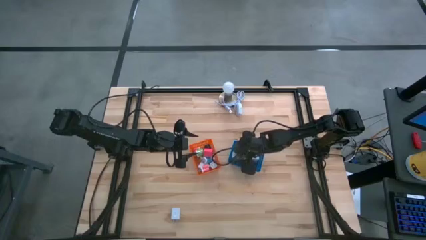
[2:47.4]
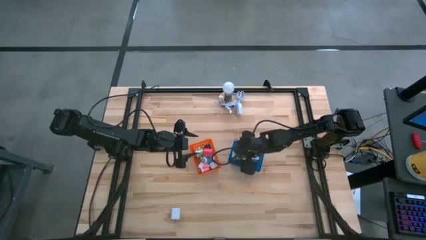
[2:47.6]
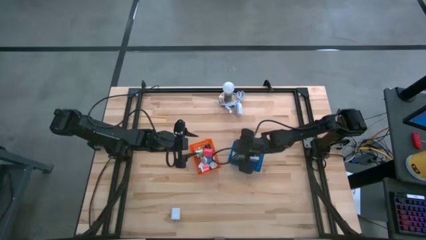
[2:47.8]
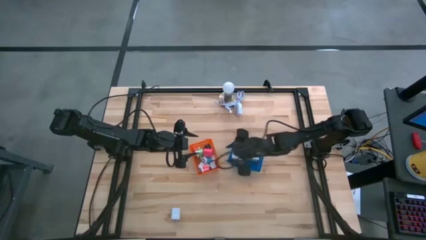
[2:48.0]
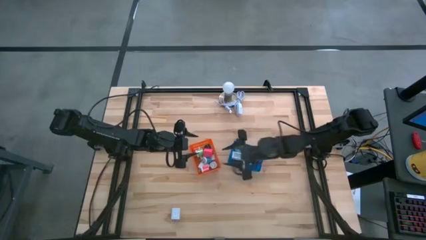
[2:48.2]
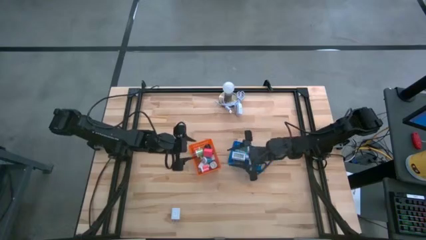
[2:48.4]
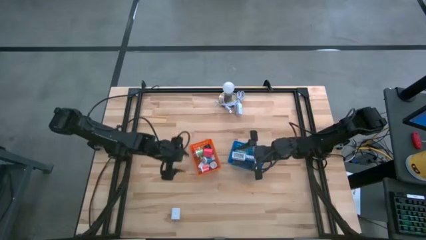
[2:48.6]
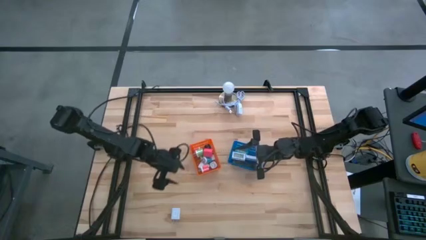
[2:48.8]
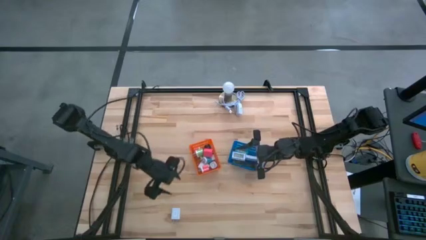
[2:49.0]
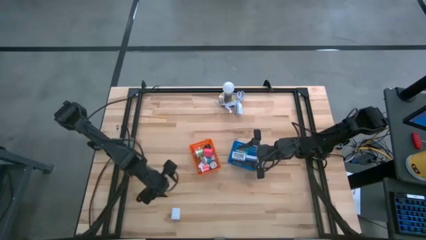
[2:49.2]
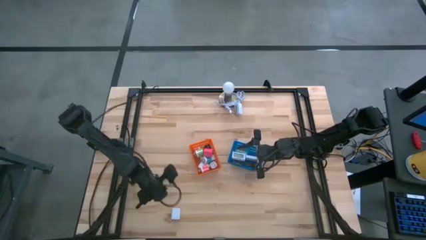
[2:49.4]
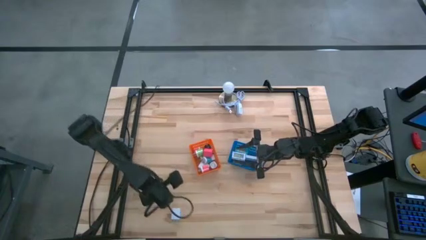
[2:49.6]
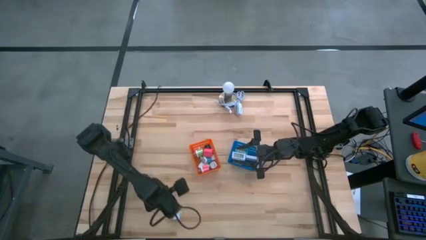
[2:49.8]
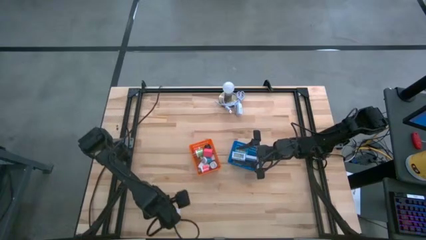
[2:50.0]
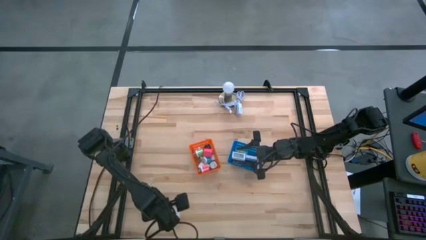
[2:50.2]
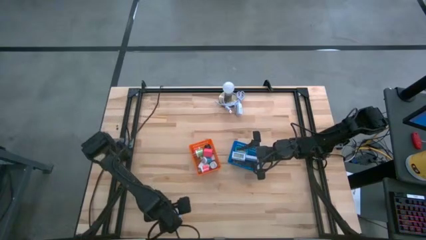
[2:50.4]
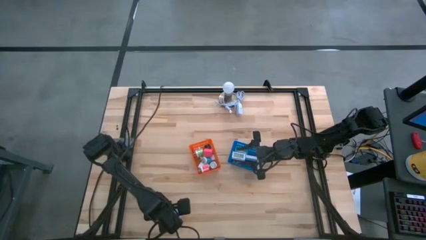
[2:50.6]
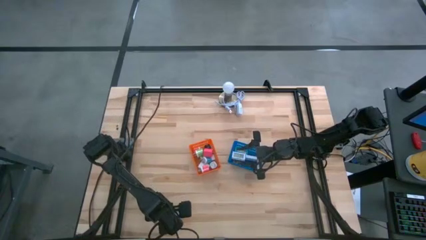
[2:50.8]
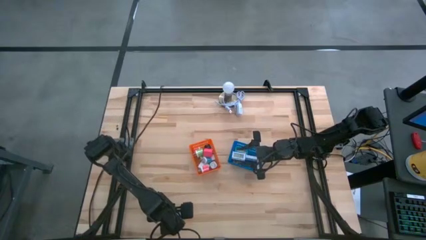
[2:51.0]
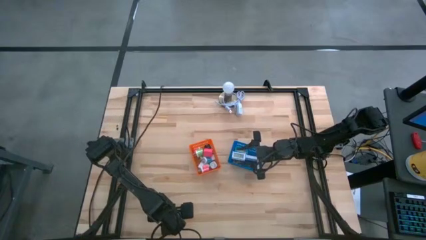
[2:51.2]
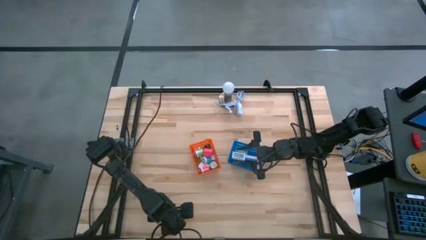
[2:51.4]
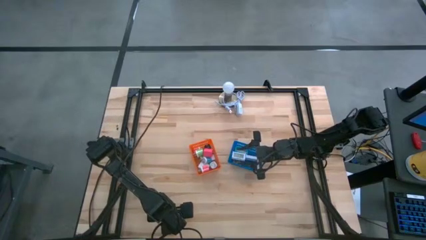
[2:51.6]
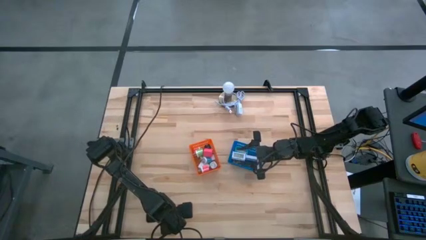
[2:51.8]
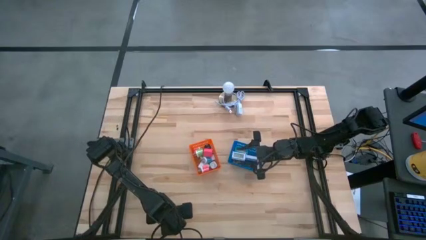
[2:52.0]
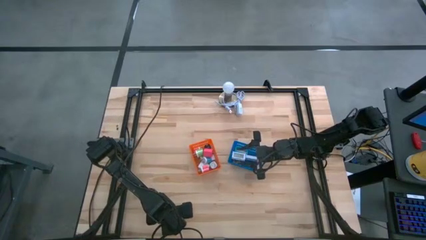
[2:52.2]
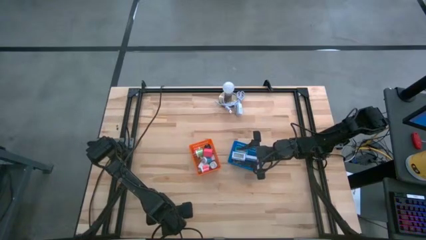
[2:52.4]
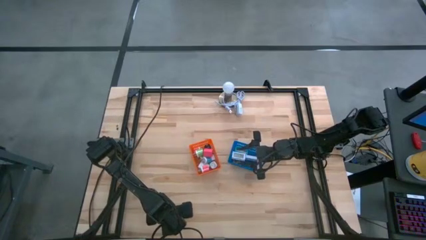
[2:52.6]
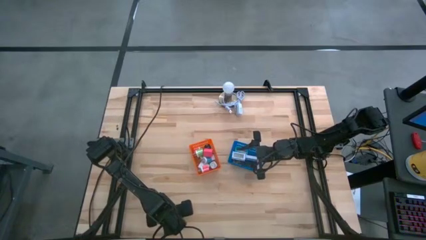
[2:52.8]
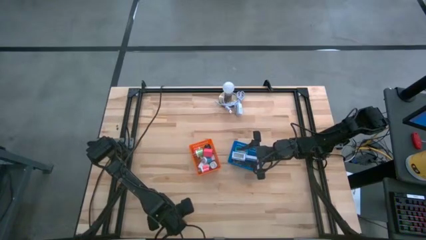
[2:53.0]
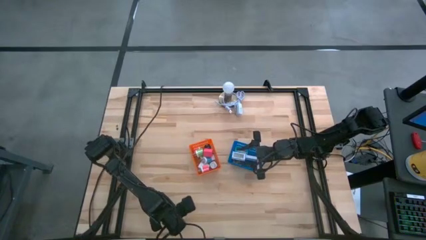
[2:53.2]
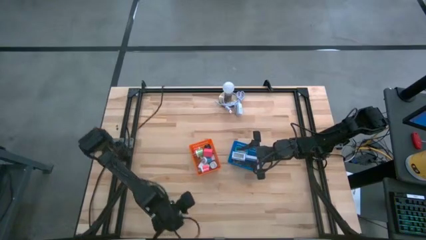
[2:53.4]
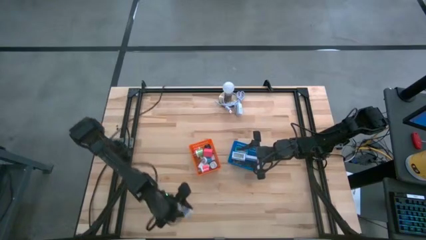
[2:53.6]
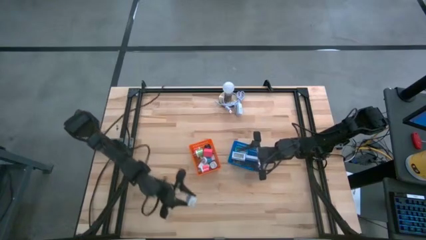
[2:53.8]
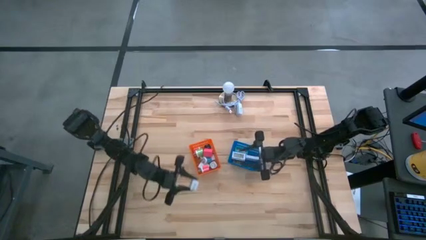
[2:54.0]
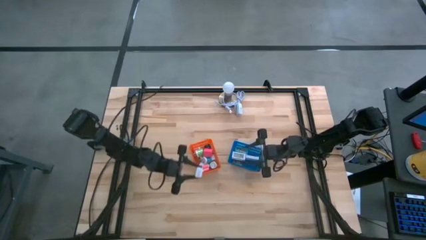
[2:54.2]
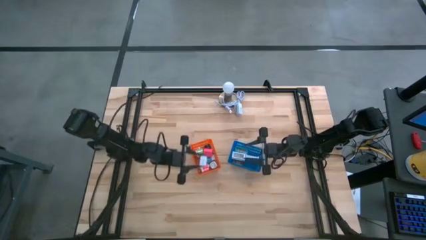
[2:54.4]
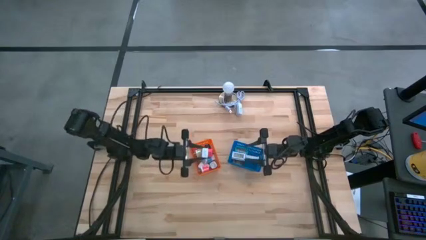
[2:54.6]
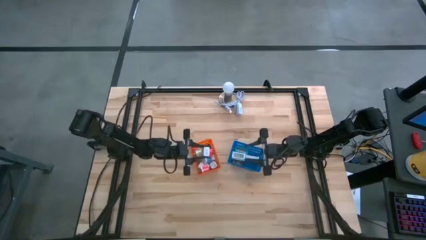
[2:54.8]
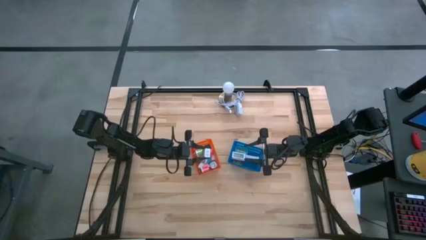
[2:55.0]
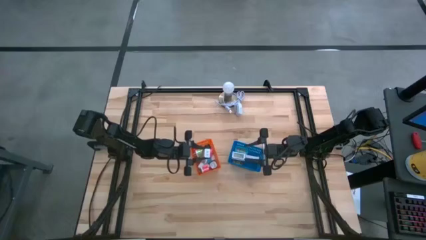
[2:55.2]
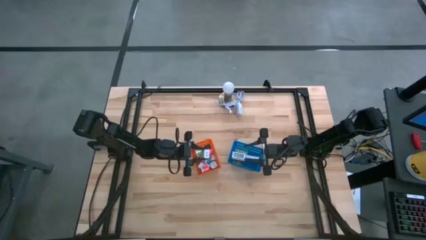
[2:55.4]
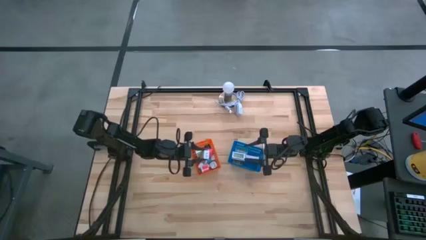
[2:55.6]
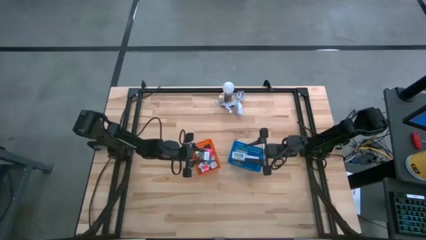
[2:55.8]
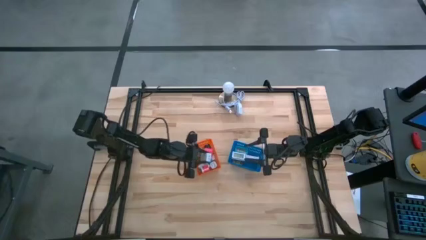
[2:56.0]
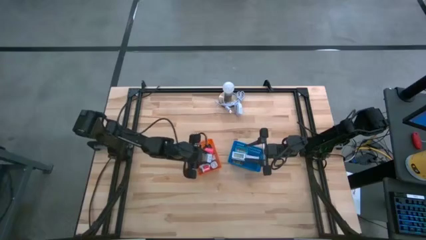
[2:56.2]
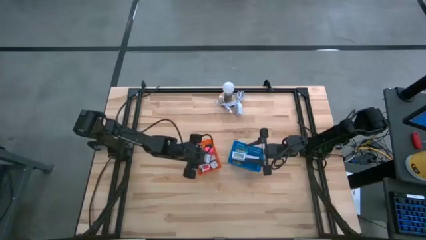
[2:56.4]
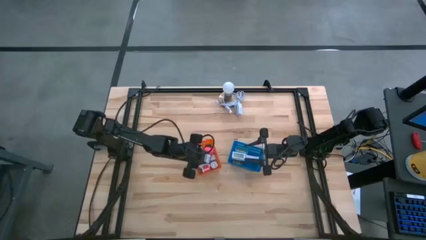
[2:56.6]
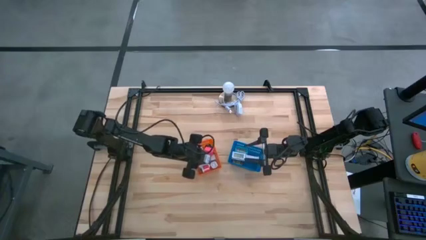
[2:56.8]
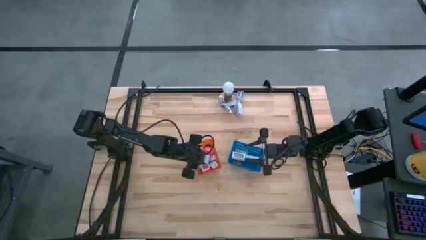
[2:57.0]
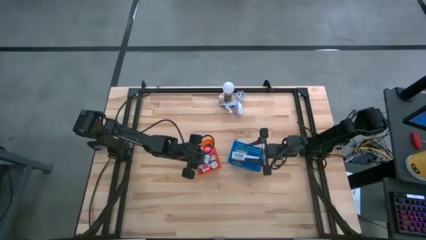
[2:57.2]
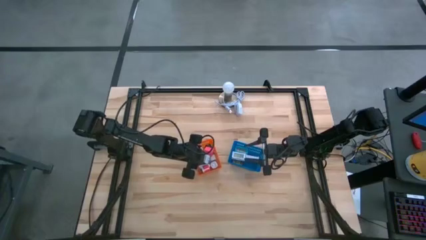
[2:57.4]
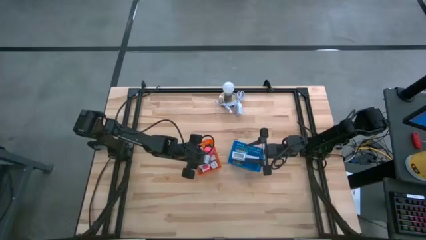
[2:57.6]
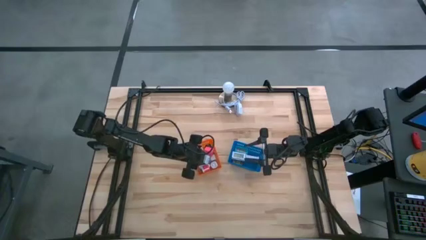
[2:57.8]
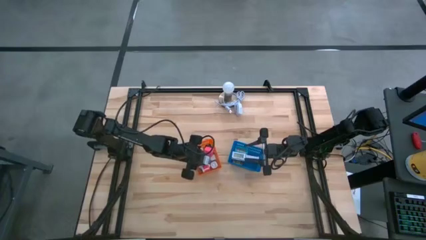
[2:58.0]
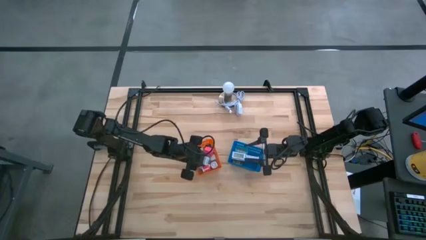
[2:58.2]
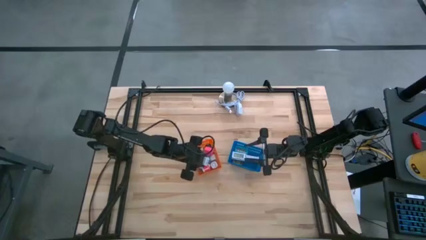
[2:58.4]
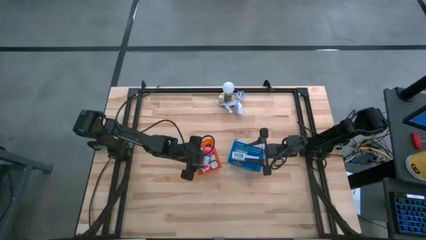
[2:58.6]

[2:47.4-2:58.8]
Task: Pick & Place Office items
Put the white charger adapter into the orange bin

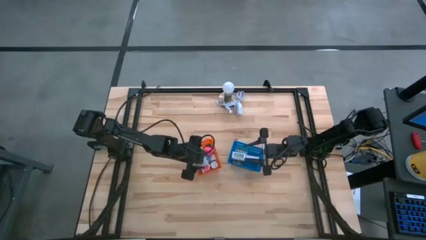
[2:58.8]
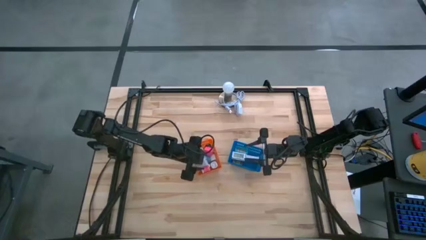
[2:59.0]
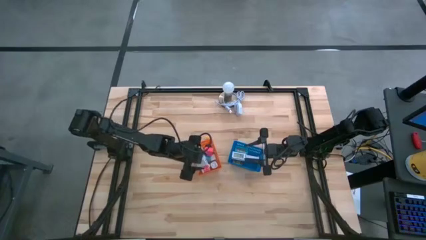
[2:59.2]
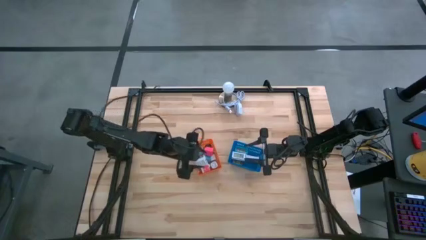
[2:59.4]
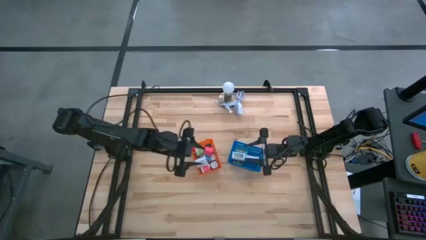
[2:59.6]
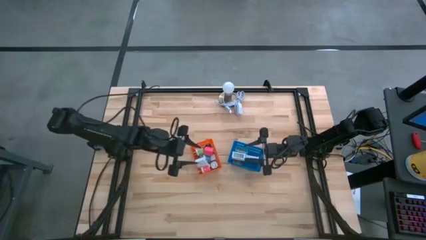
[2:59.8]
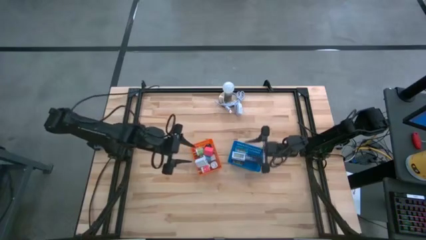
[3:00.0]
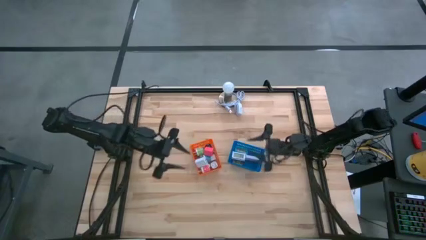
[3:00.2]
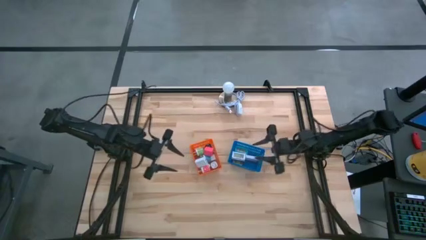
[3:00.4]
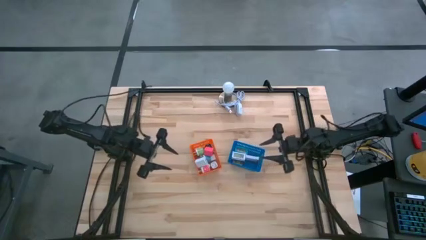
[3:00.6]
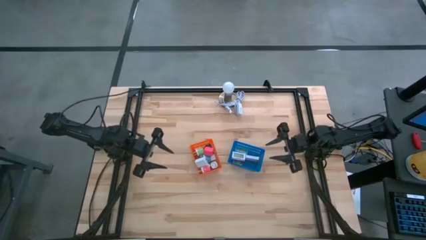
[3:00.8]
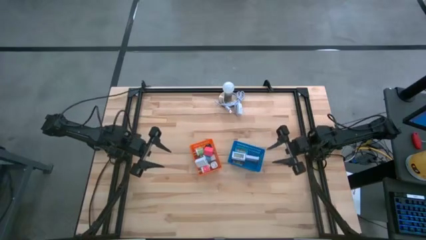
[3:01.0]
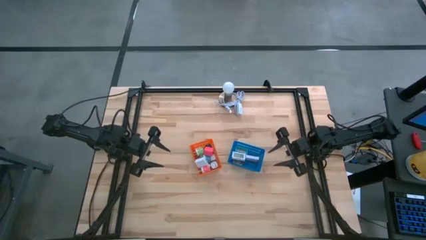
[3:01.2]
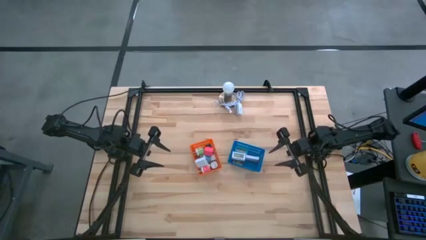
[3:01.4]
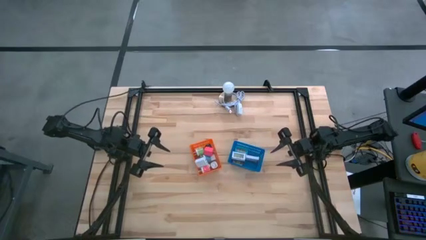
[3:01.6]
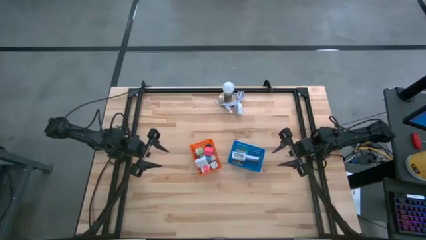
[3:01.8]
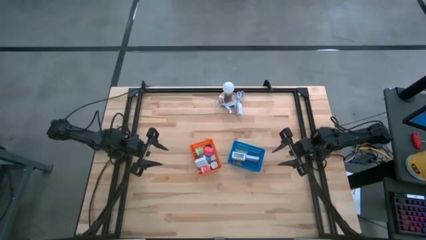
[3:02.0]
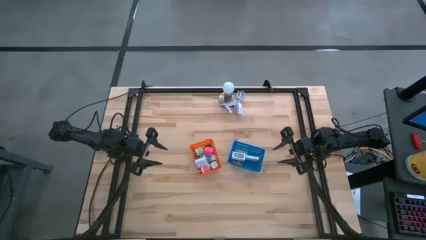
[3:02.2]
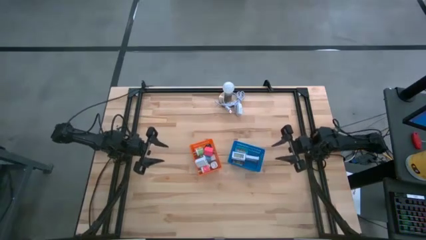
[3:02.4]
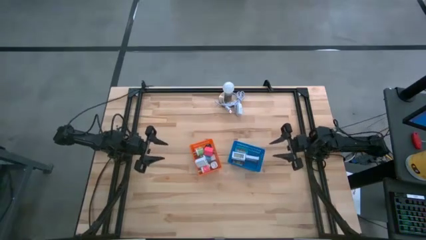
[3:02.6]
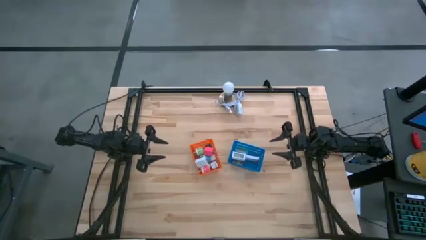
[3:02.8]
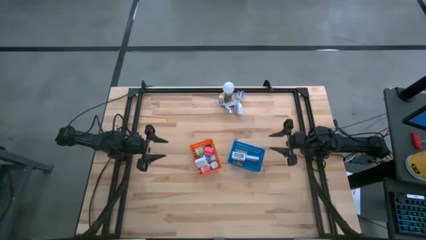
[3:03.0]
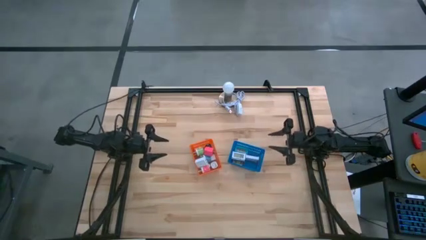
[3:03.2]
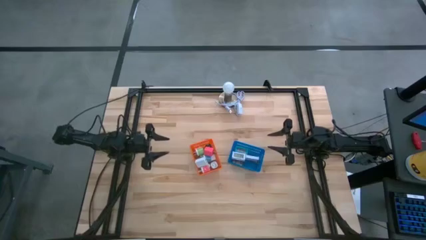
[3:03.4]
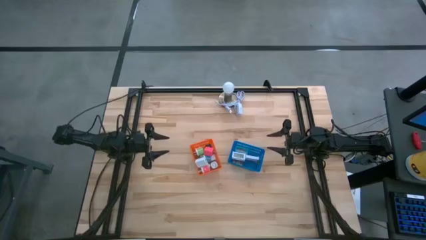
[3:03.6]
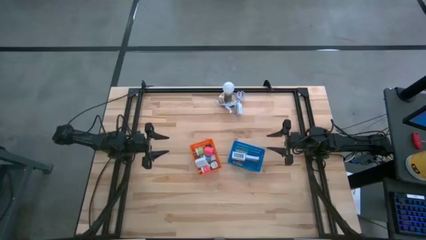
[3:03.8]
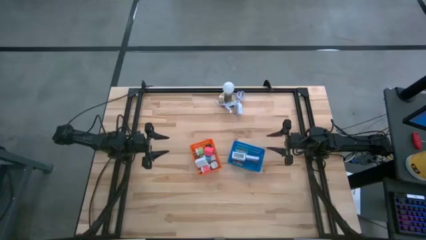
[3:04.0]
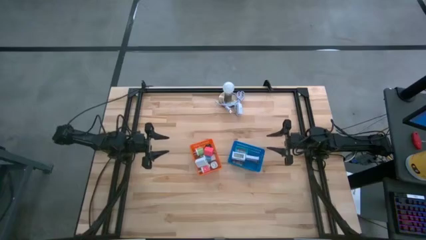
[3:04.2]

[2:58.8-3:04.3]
Return to Home Position
